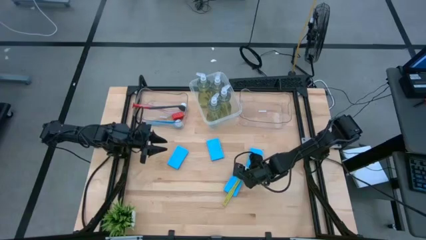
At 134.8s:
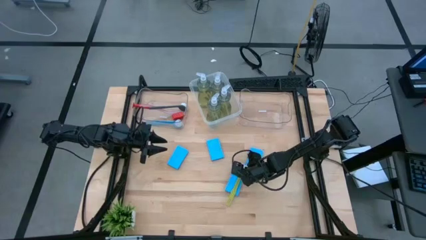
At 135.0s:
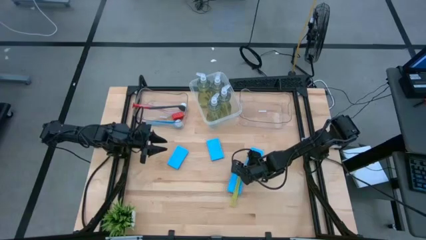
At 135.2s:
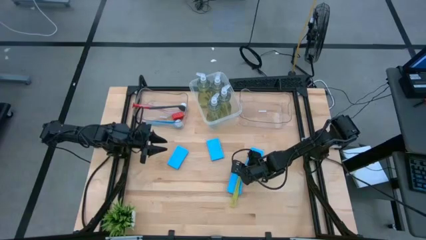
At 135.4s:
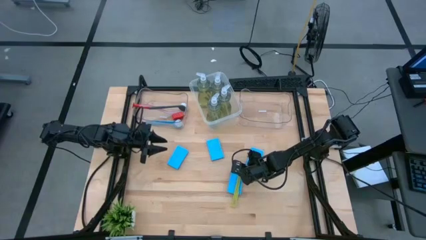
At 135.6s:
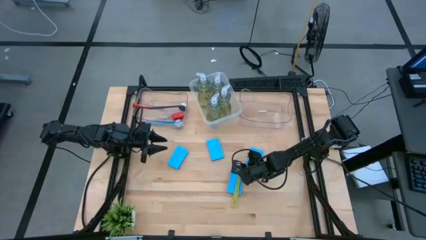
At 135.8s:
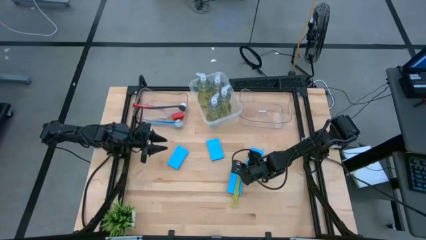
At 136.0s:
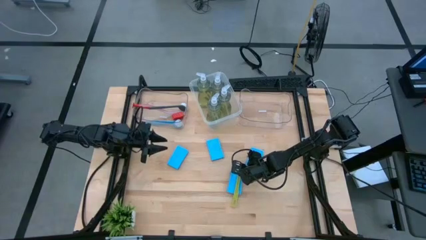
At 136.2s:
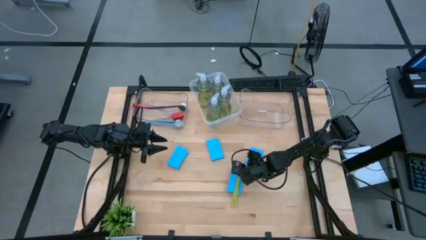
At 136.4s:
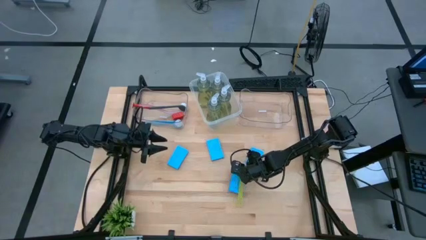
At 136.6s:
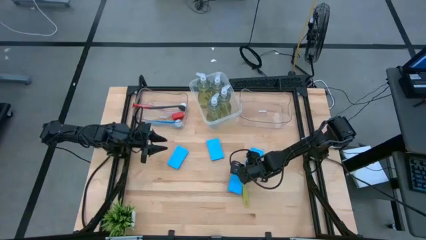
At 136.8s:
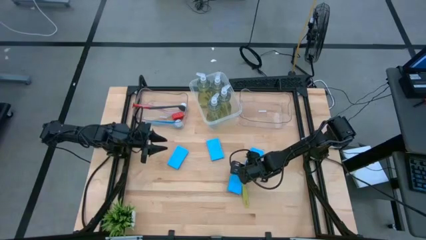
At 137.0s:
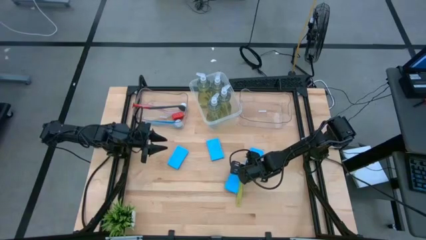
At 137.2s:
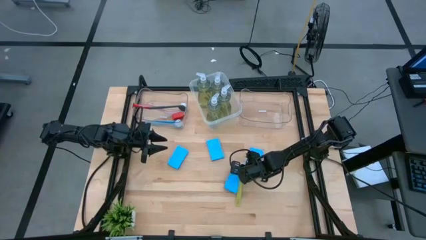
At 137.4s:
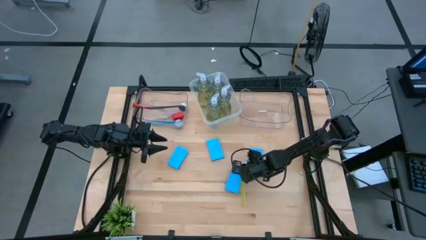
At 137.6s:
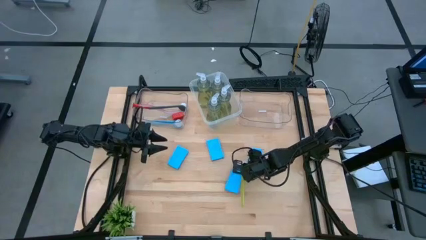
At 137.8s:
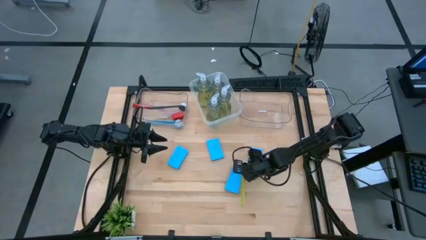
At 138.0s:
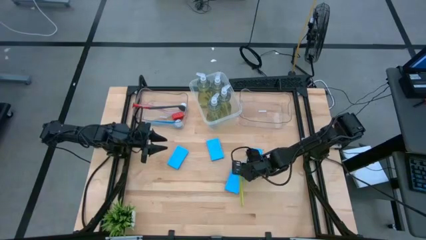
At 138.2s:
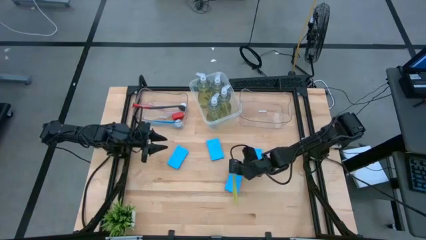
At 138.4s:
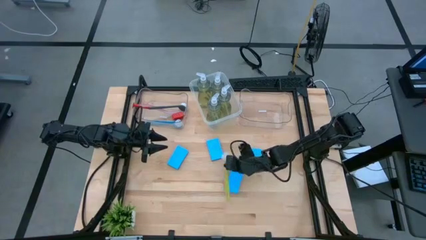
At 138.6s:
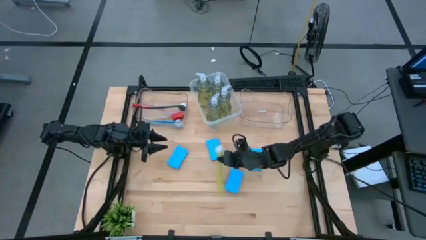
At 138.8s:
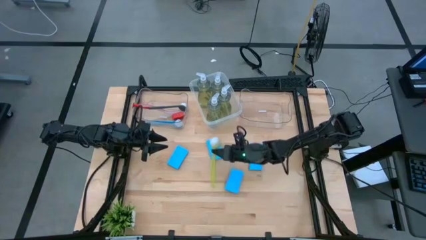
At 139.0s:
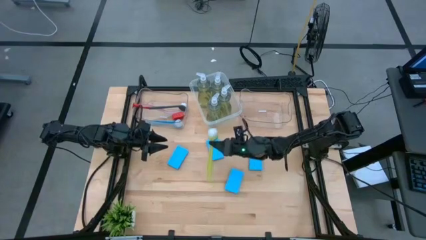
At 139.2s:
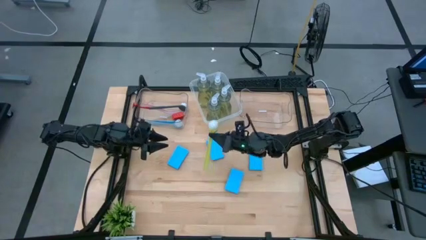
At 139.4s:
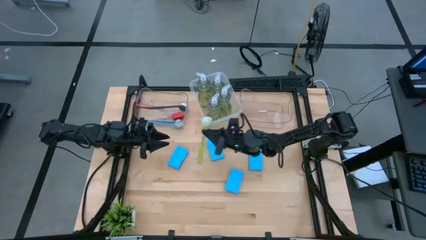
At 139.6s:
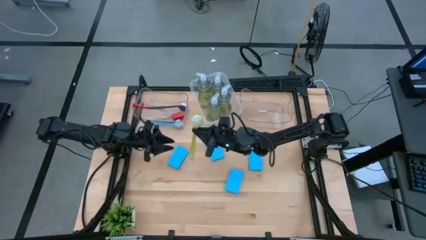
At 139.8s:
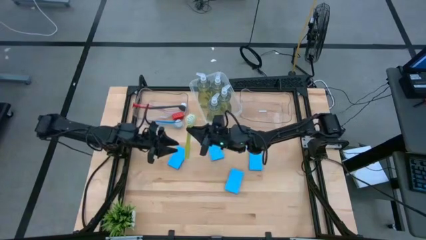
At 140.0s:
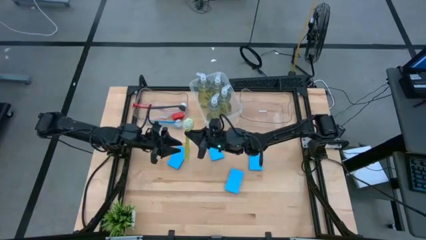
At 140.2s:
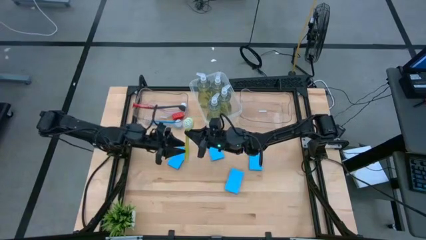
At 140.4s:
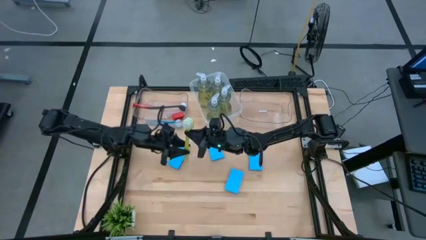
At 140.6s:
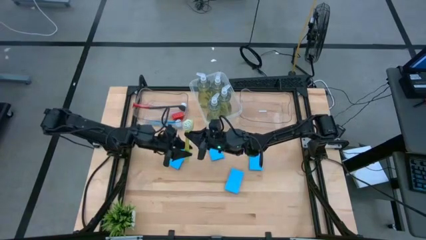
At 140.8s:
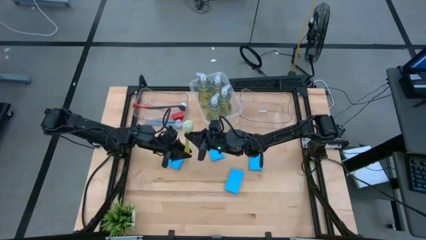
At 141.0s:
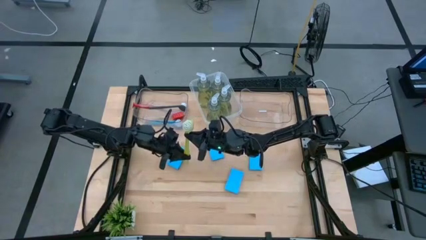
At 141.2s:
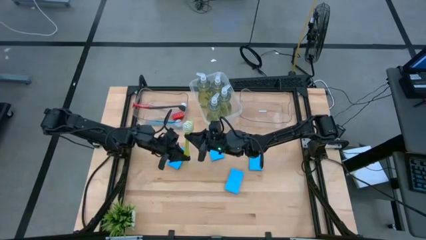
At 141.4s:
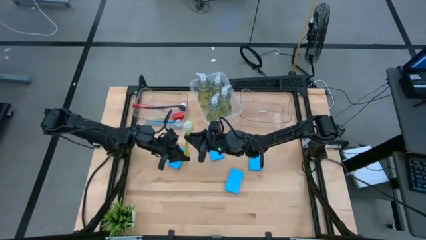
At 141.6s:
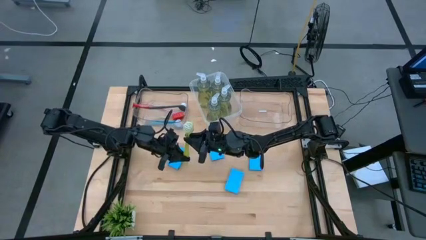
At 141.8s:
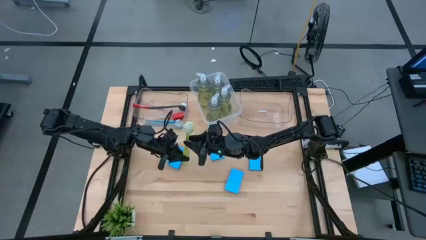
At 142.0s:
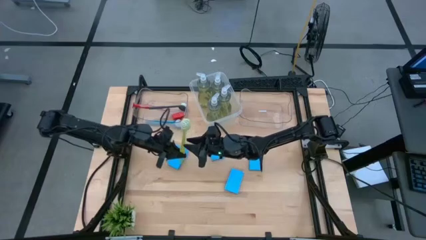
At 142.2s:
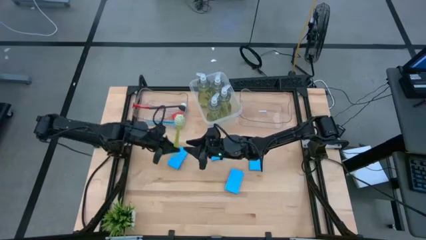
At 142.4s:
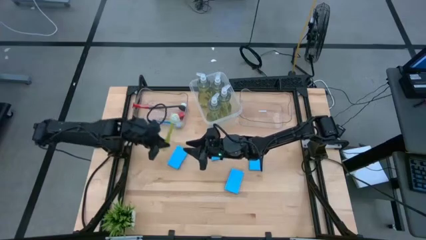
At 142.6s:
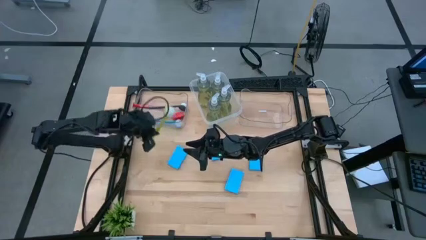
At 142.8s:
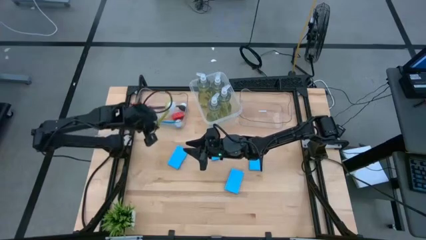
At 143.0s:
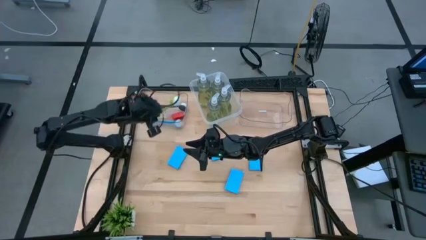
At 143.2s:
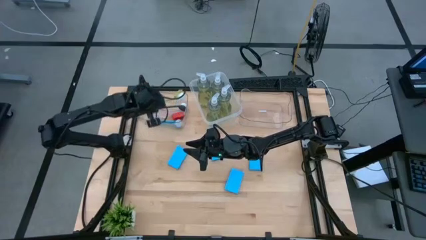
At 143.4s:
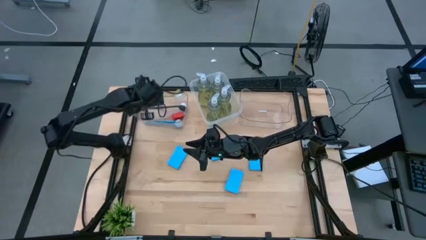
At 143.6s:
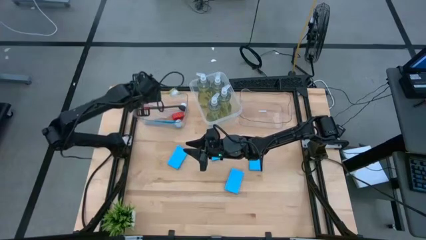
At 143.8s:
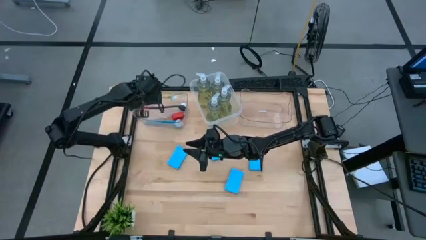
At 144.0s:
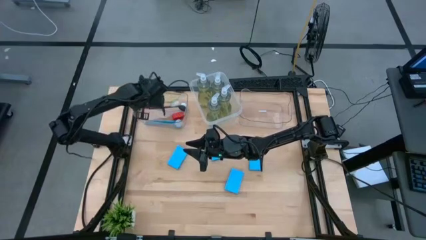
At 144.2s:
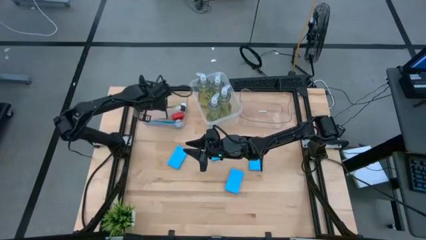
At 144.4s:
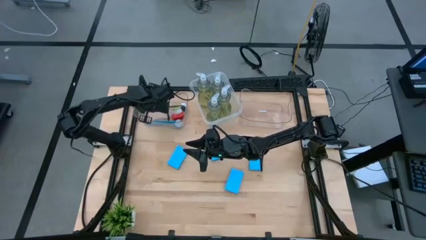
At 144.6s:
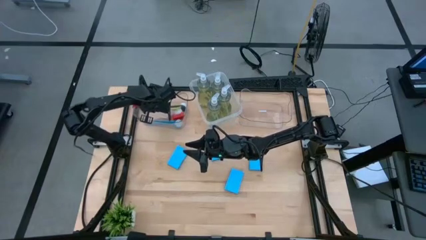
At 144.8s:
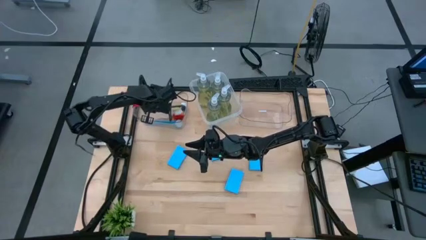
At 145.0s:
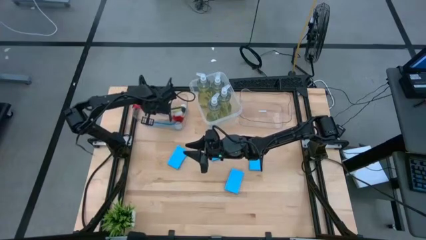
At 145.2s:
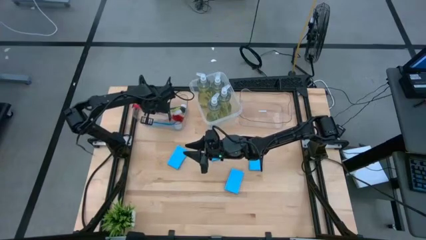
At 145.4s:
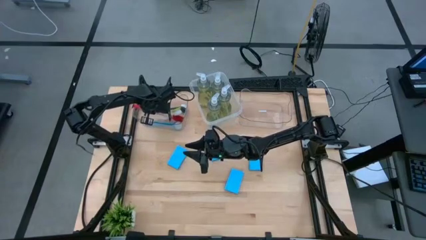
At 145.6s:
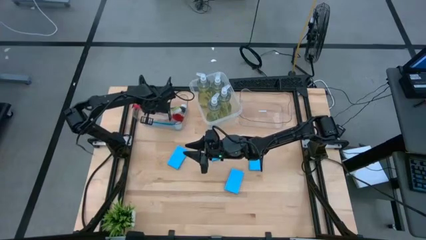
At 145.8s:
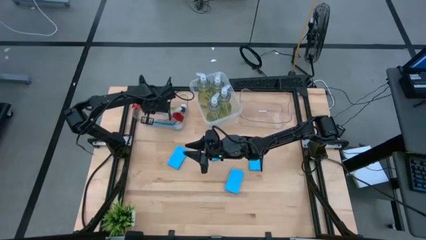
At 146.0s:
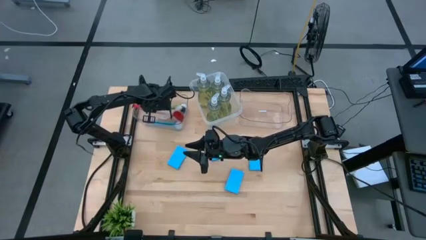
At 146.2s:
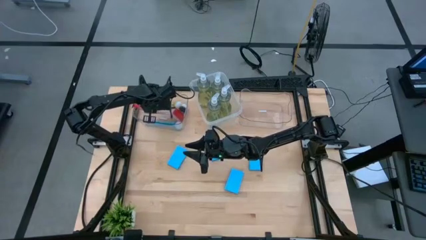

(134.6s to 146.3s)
Task: Pick & Place Kitchen Sink Supplies
Put the green cleaning brush into the left transparent bin

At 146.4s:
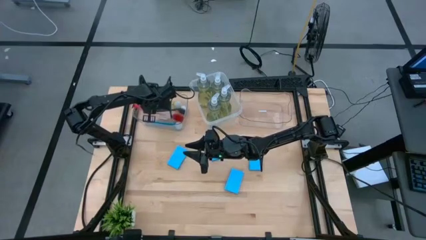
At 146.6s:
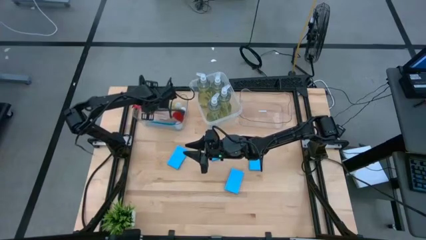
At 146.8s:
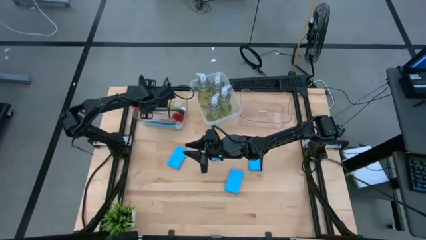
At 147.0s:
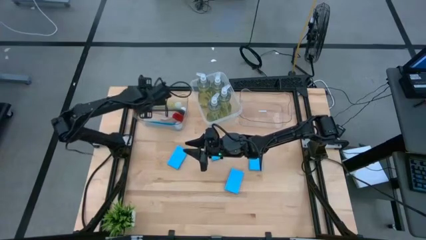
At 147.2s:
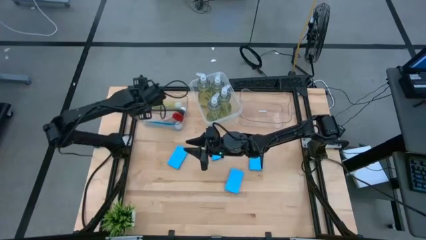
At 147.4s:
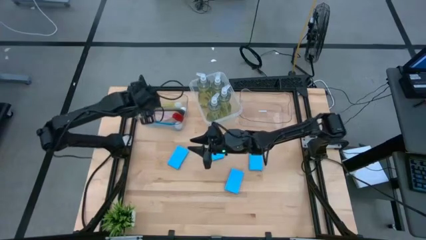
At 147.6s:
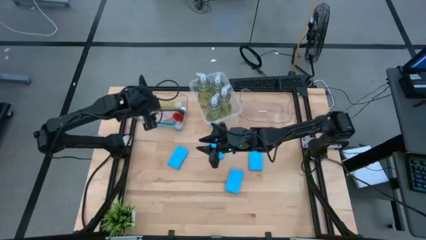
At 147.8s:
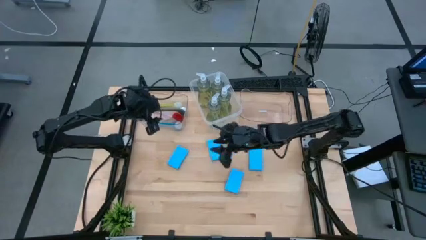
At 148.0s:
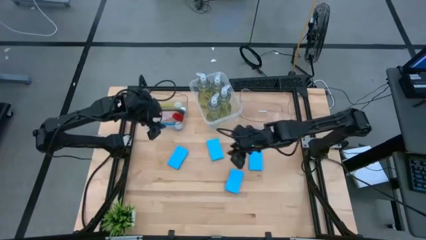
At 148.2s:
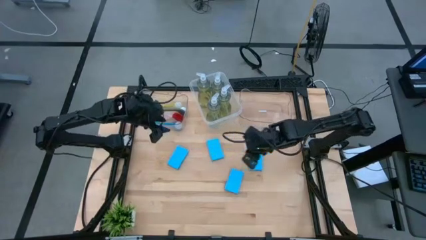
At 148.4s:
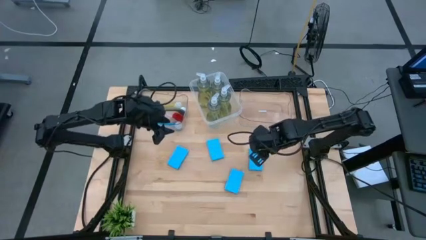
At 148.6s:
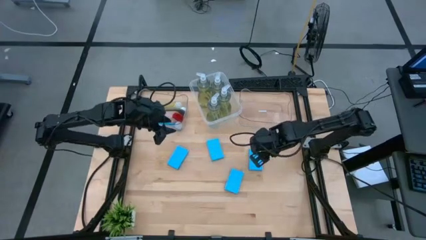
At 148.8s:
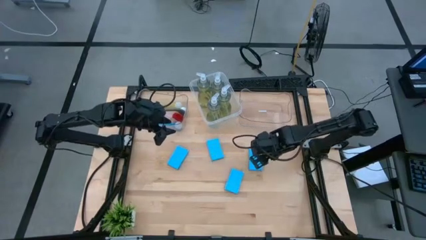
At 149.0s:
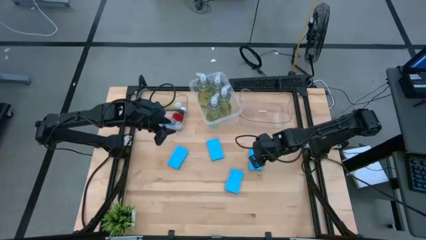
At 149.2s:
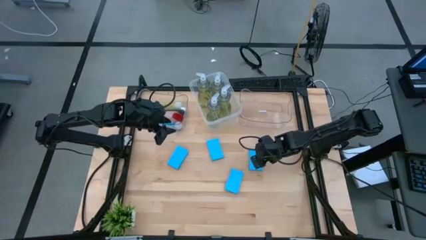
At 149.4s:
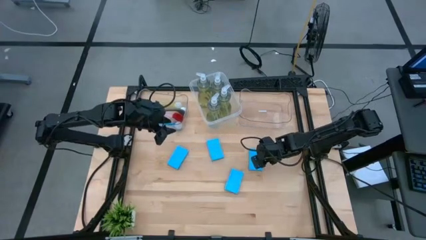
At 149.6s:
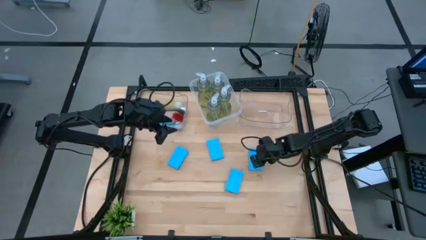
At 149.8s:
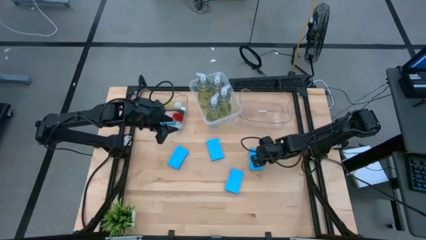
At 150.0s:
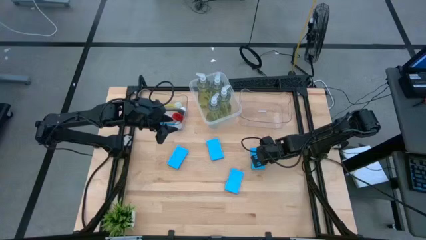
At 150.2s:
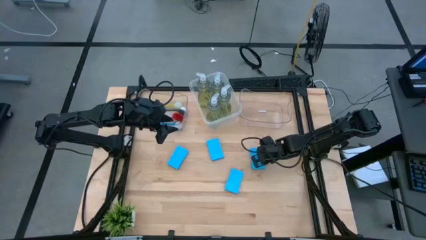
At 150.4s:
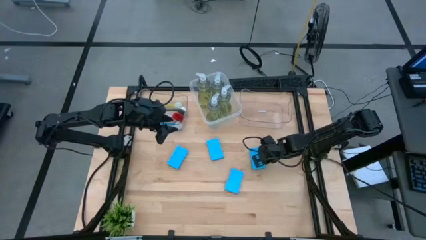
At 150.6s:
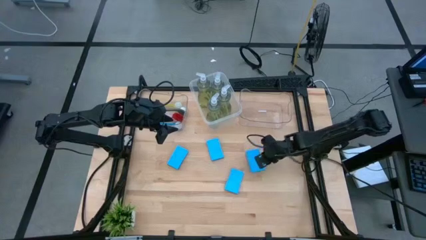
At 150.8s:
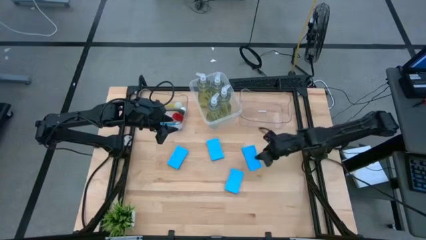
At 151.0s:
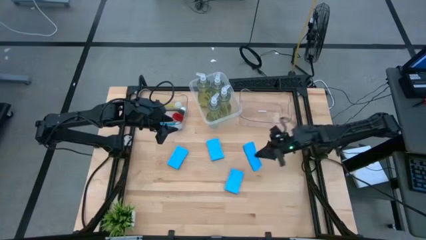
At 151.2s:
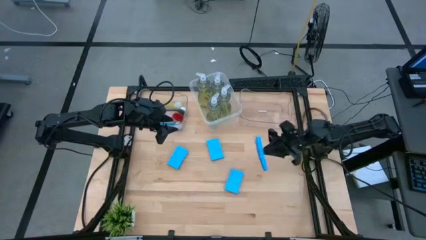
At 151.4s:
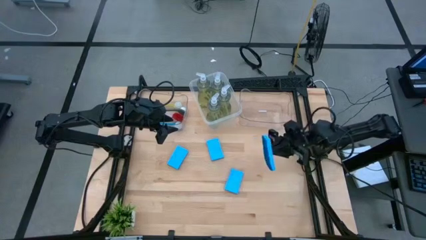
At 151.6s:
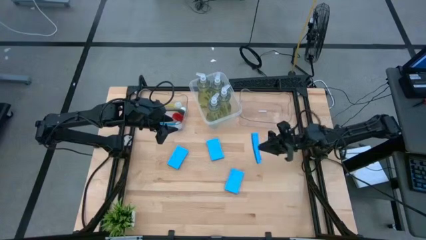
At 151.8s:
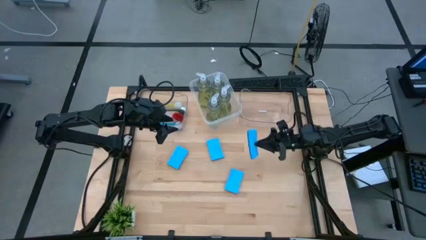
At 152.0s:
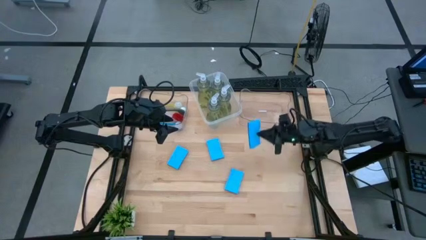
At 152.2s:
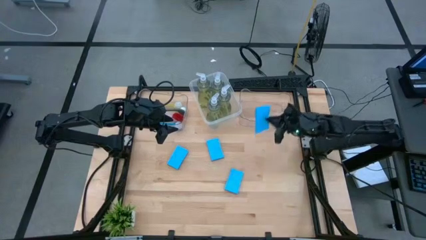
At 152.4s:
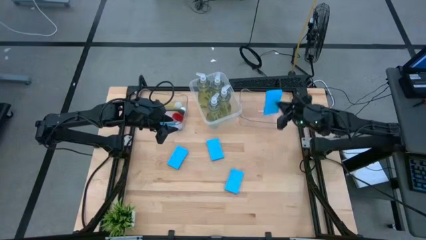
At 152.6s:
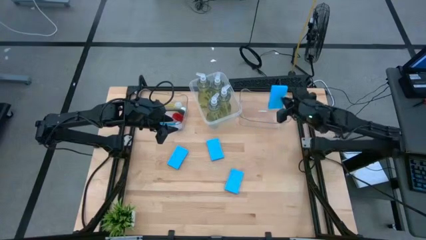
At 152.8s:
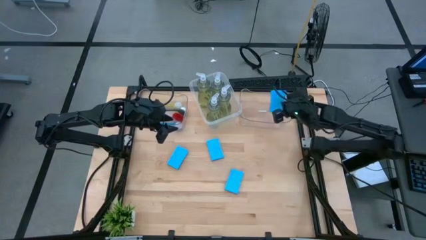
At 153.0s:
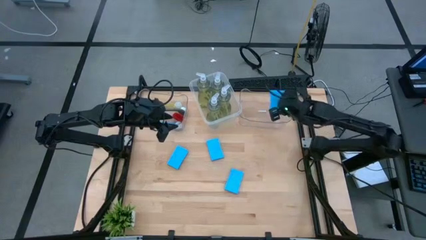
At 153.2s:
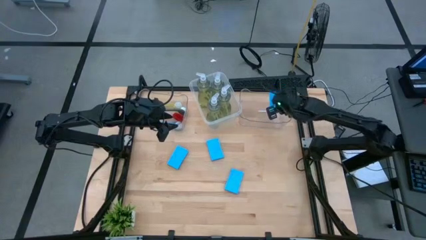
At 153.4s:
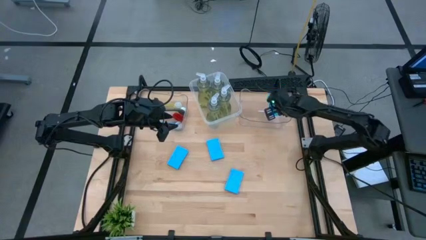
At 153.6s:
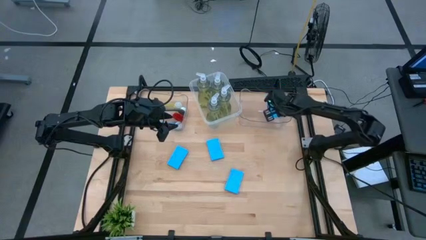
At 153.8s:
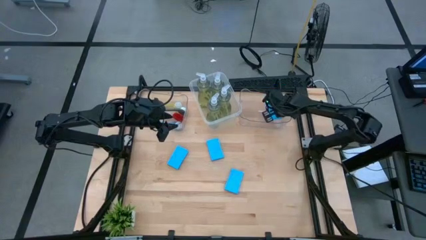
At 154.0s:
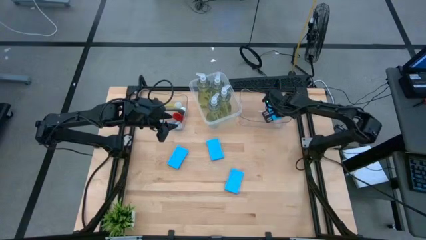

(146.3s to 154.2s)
Put the blue sponge into the right transparent bin
